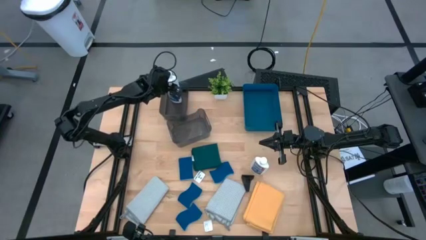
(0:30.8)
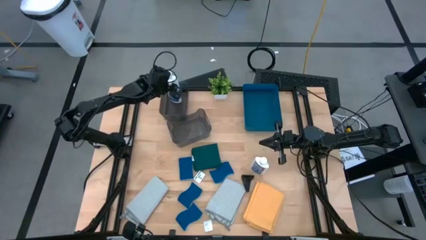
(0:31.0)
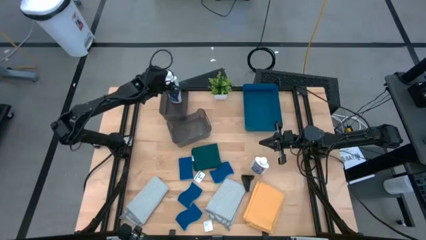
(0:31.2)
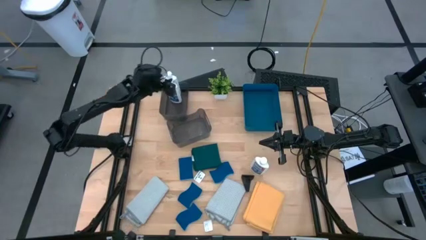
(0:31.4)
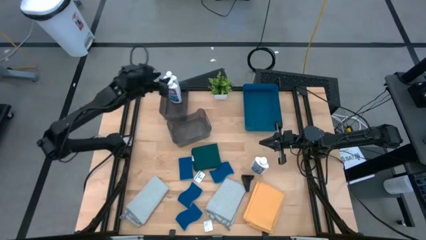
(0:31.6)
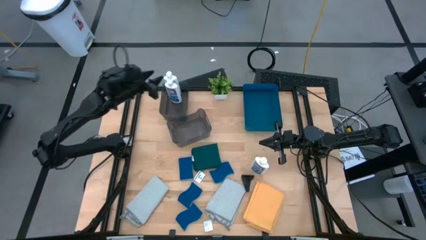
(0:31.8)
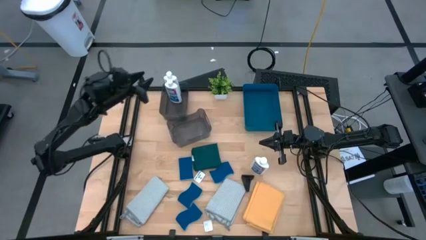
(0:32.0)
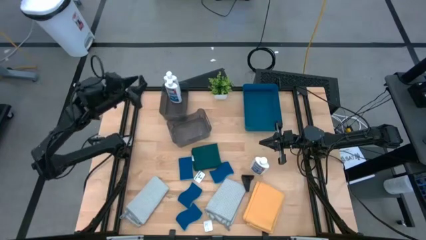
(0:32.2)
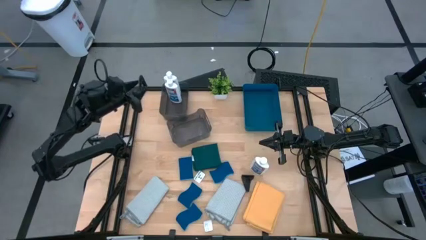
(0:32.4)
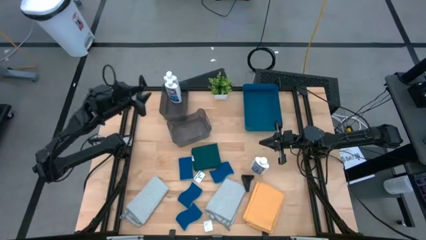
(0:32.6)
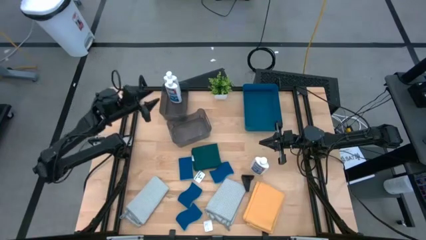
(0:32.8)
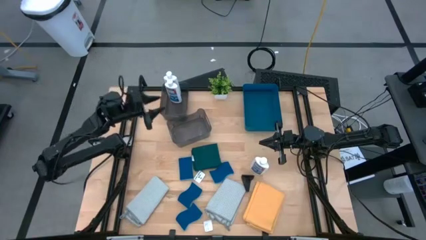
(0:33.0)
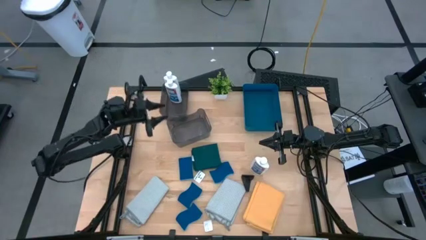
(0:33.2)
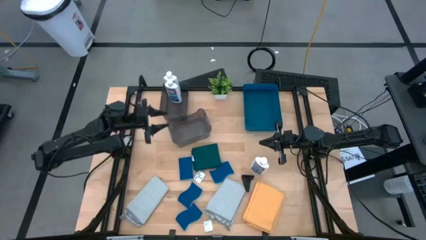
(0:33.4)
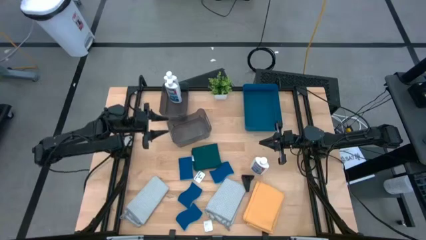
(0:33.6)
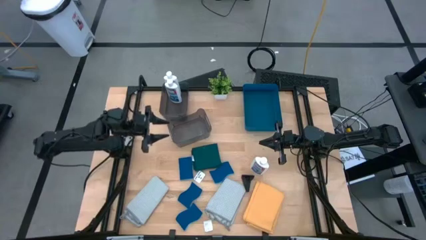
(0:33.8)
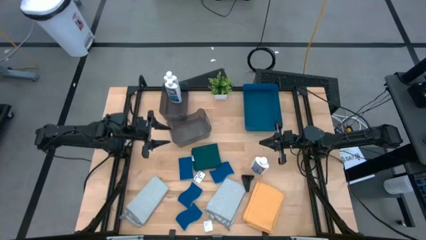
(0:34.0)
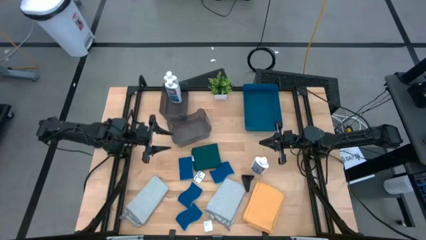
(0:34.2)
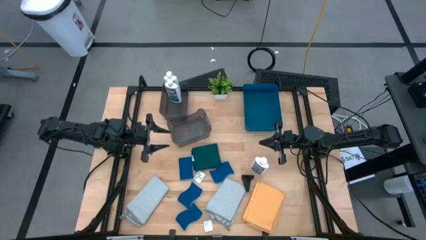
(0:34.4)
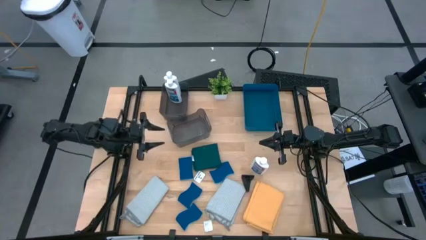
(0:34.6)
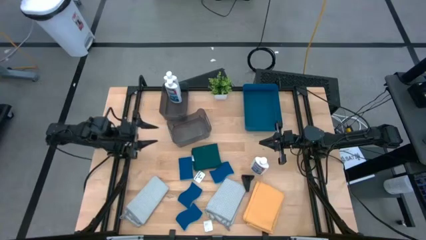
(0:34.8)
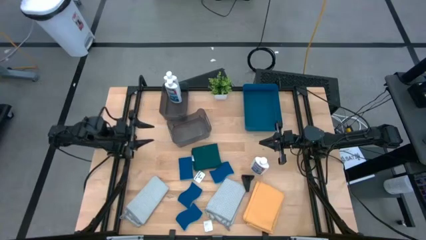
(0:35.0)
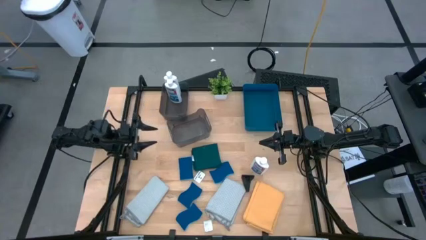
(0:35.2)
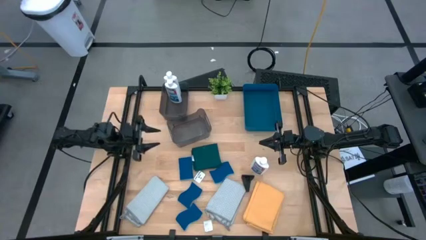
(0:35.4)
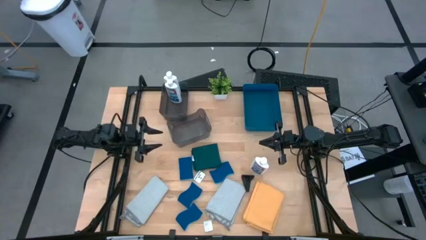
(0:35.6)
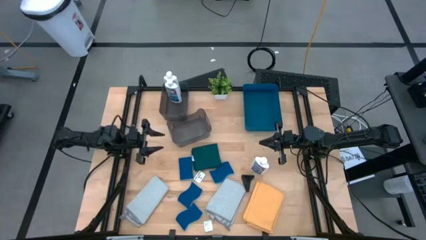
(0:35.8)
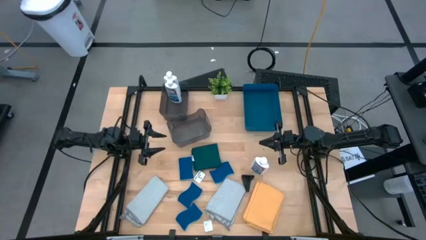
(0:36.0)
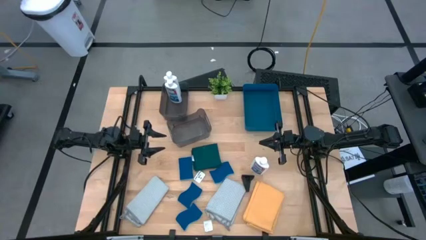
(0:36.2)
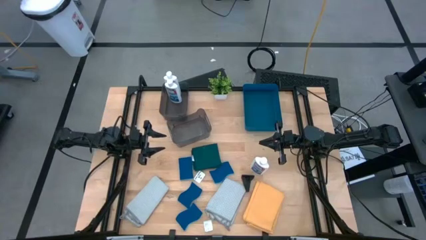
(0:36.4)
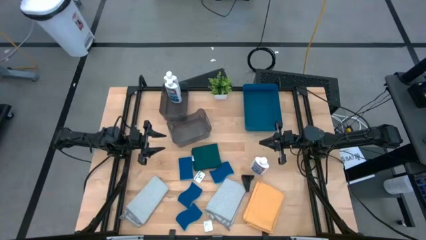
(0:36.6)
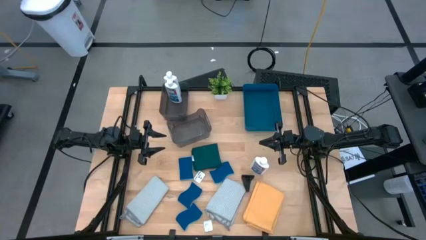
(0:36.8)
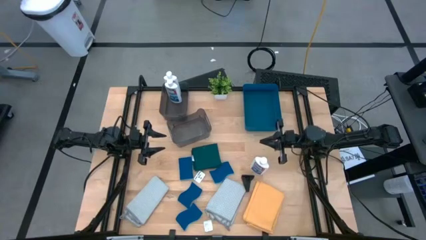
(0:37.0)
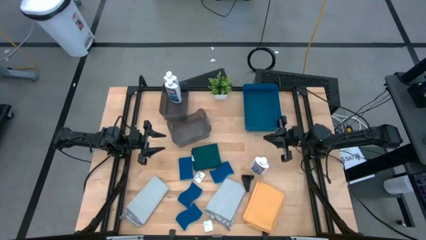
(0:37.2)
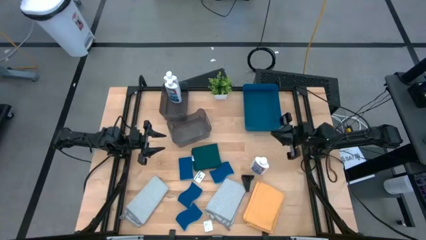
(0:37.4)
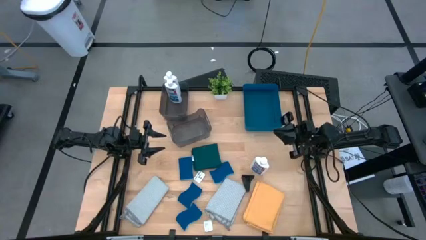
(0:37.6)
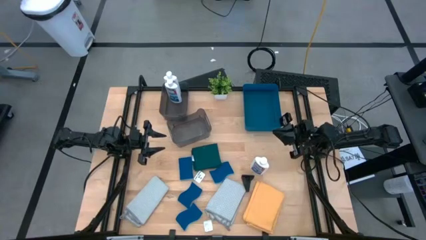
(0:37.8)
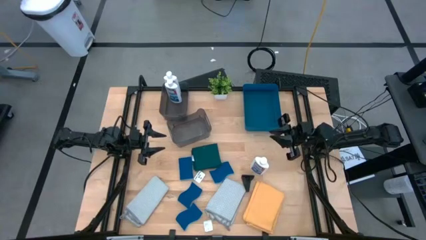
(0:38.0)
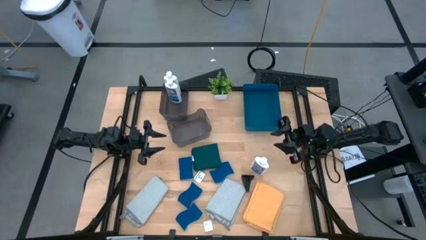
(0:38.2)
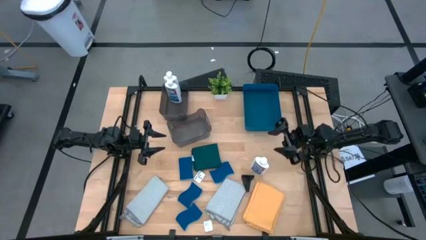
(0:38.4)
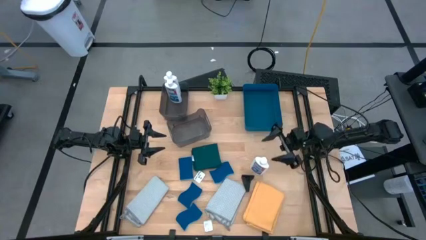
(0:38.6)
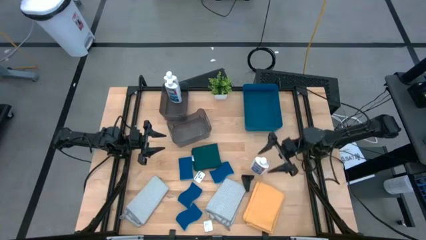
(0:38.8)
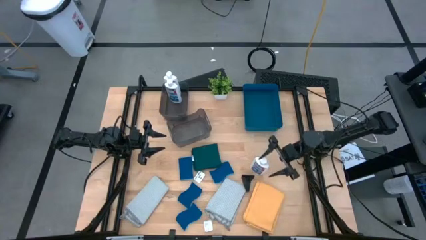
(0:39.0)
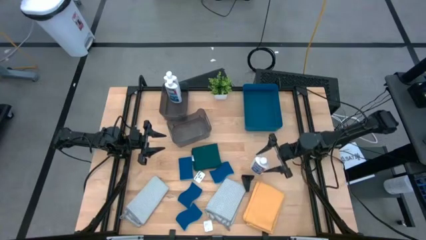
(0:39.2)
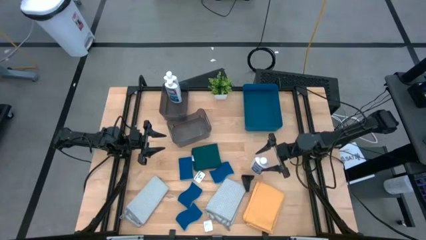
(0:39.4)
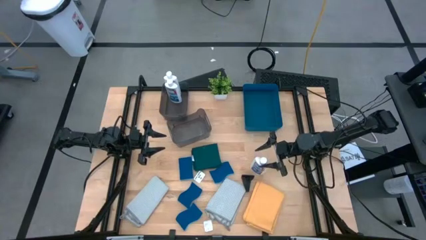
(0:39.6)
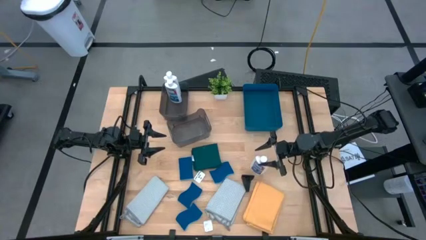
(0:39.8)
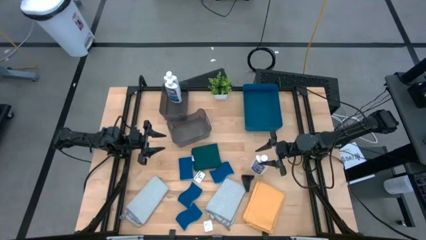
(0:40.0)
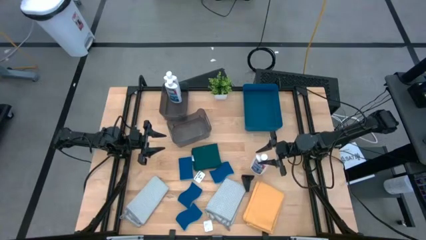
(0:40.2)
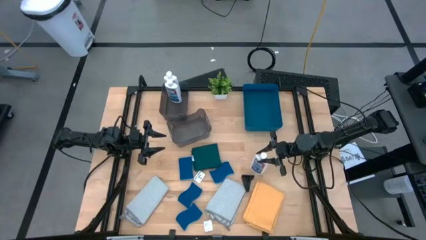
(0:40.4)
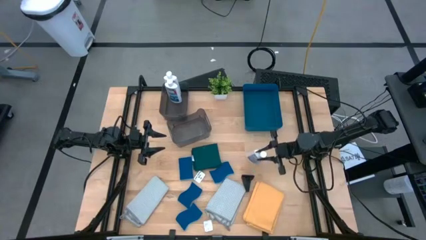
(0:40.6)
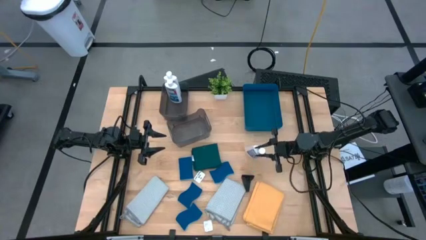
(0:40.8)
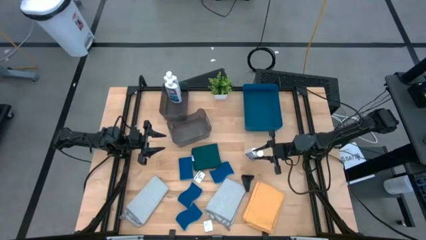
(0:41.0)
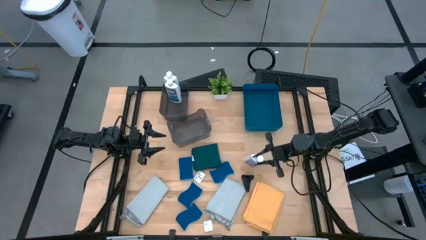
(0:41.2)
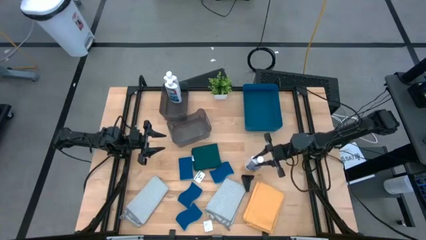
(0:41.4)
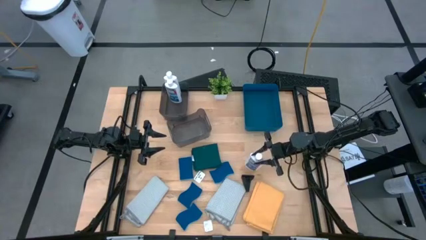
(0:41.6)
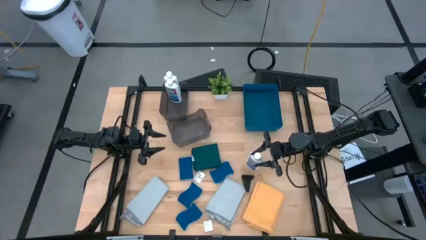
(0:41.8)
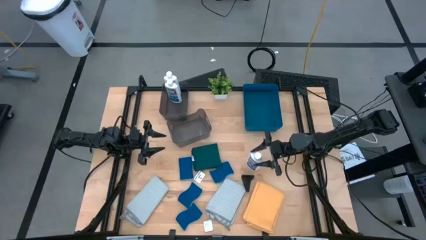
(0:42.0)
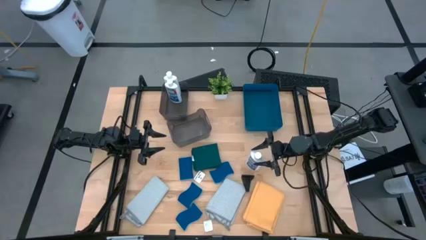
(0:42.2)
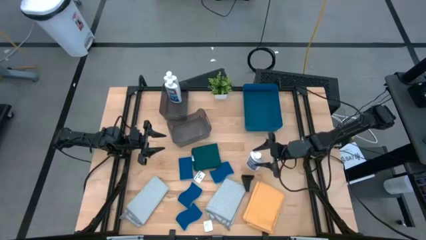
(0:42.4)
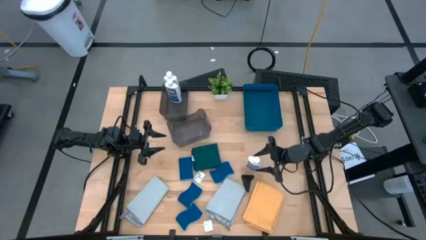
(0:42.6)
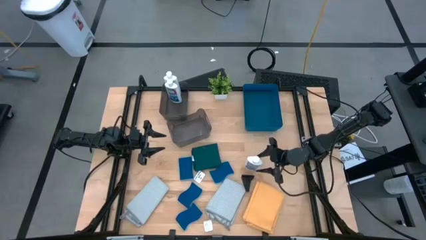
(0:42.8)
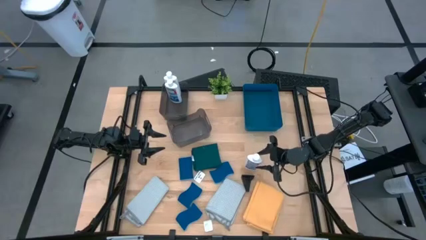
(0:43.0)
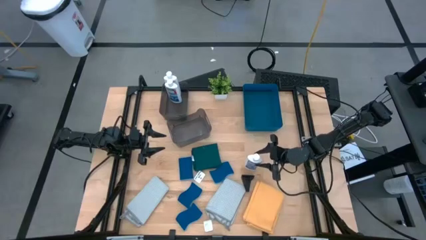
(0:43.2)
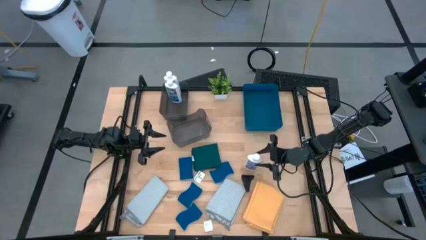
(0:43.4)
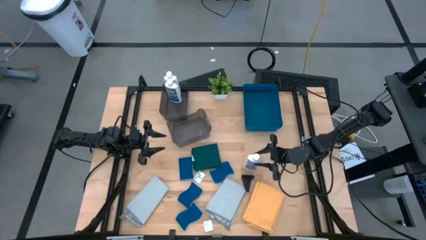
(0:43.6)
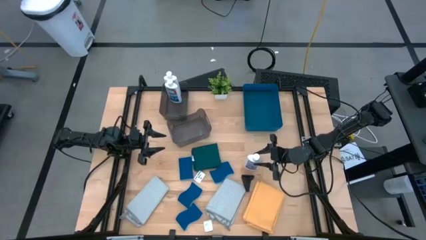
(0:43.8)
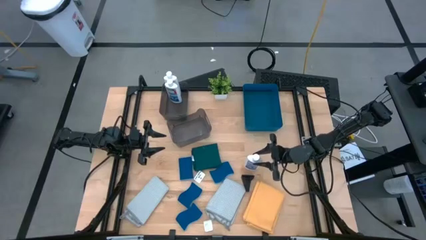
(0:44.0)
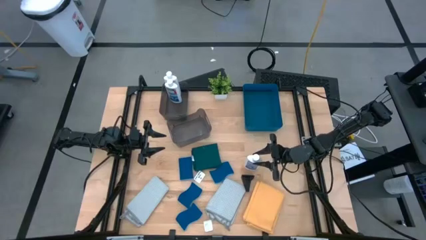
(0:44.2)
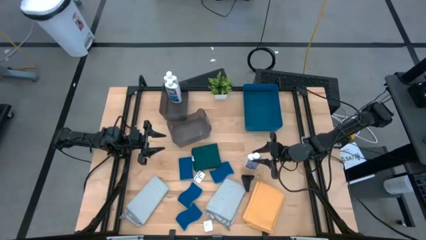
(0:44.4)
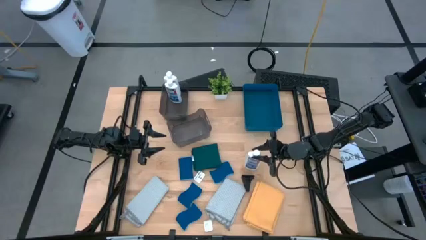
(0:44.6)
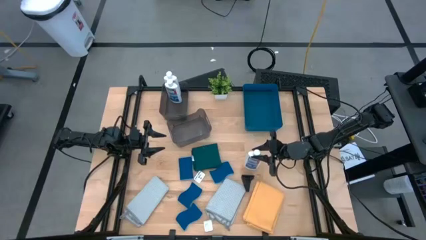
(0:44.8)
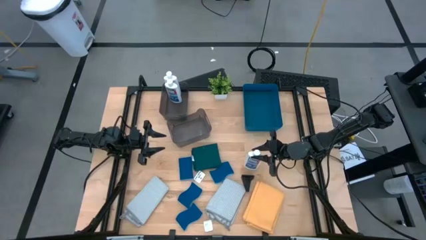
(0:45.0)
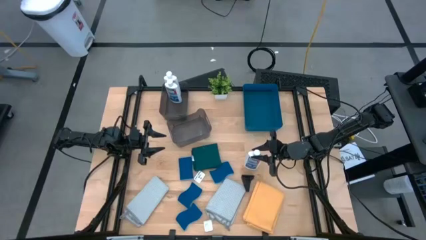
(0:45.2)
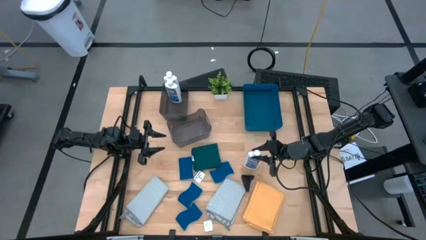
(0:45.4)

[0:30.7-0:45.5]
Task: Pick & Place Kitchen Items
Put the white restorer into the top black bin

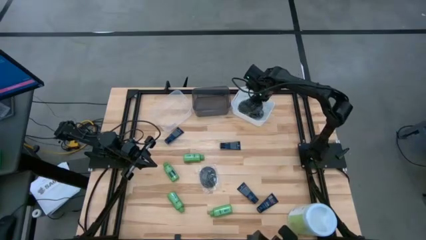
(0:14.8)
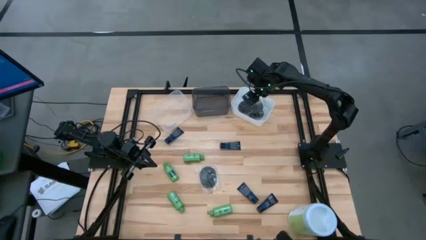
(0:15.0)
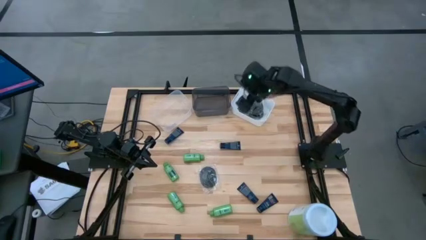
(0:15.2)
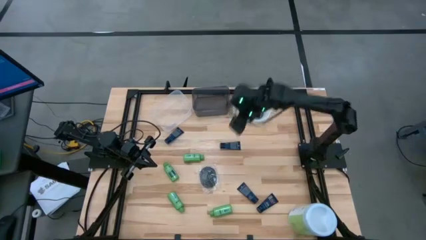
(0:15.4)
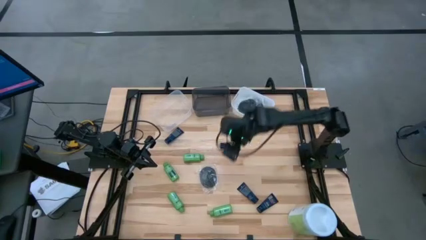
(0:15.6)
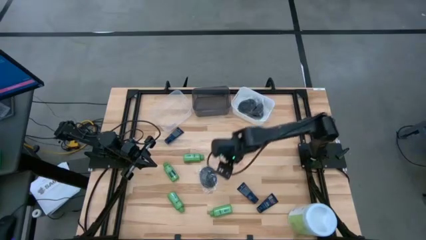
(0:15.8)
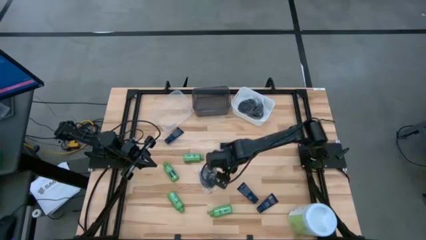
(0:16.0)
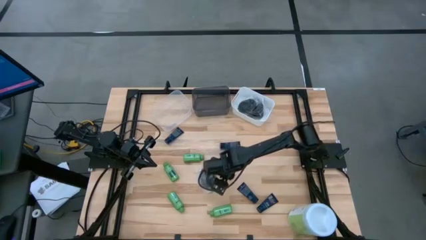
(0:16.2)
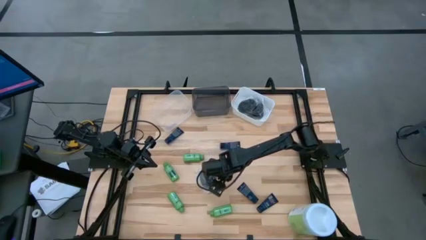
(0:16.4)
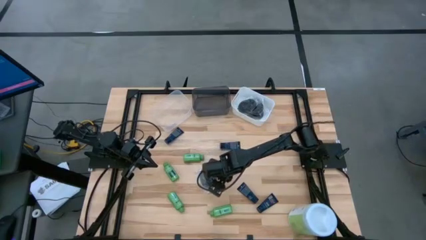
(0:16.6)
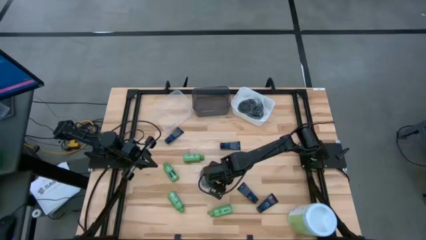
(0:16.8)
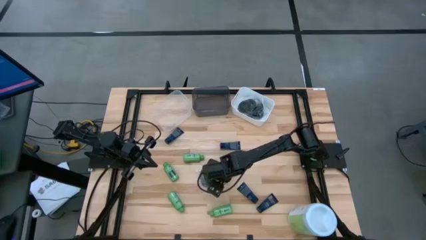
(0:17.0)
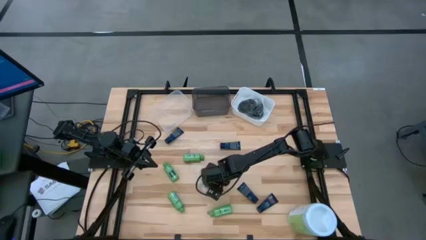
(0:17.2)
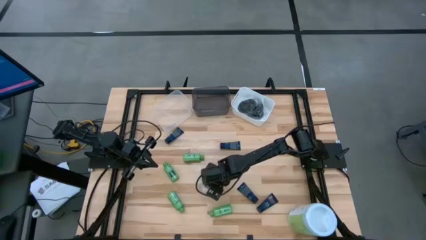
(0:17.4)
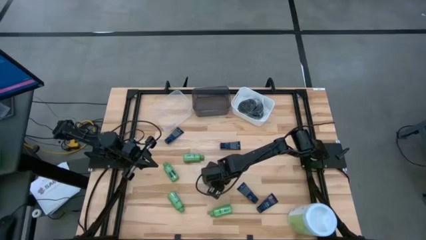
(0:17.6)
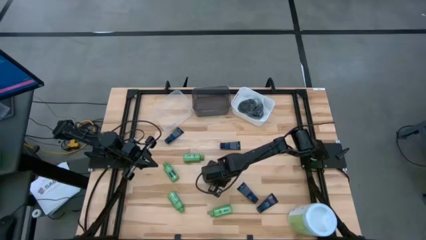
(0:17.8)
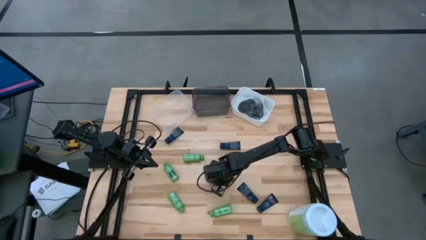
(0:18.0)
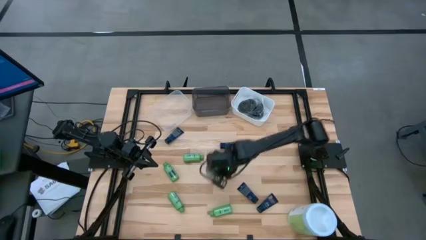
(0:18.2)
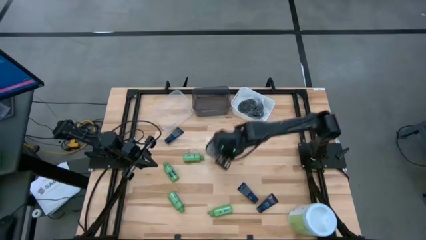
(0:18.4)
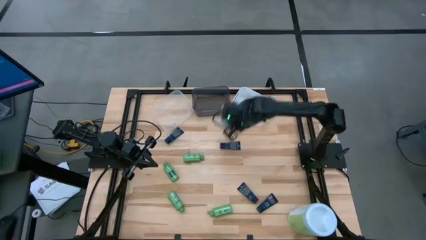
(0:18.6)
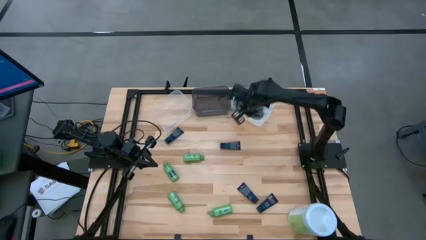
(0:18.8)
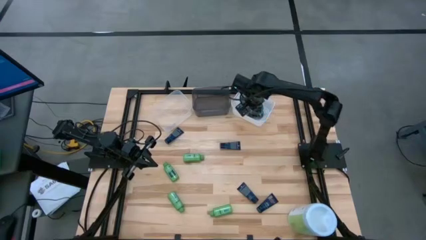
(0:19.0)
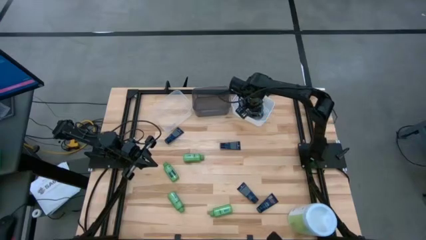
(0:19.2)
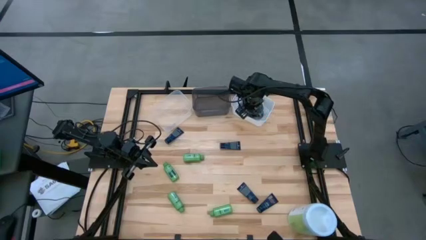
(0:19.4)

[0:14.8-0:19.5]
Task: Pick & Place Travel size toiletries
Put the black hairbrush into the white bin
